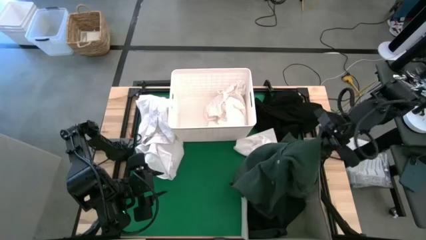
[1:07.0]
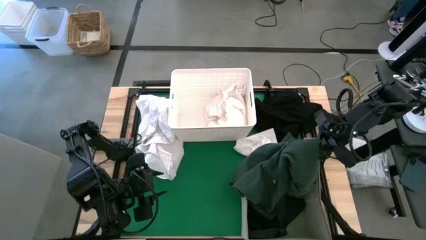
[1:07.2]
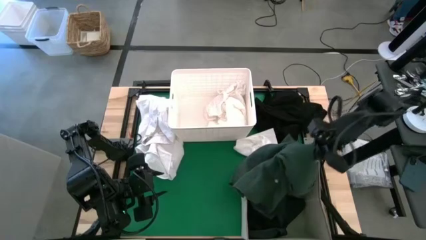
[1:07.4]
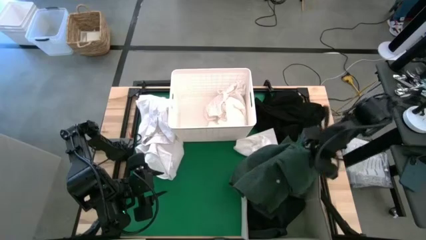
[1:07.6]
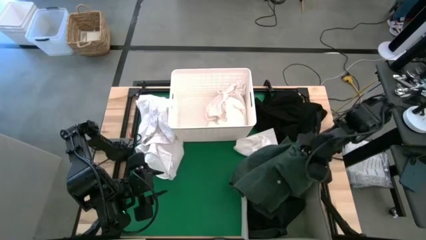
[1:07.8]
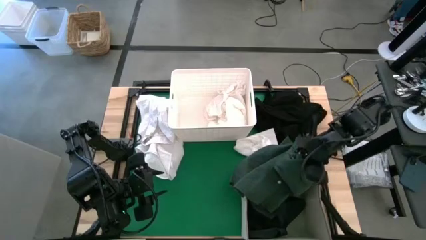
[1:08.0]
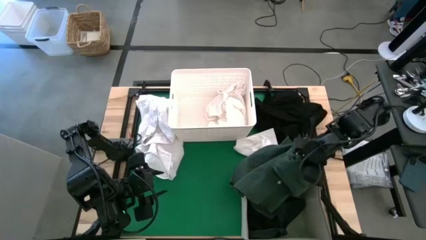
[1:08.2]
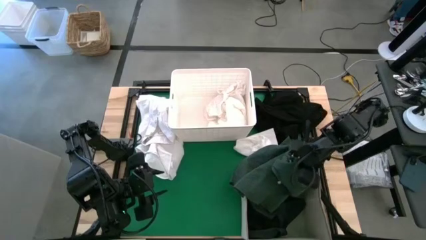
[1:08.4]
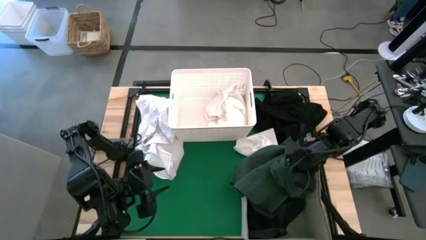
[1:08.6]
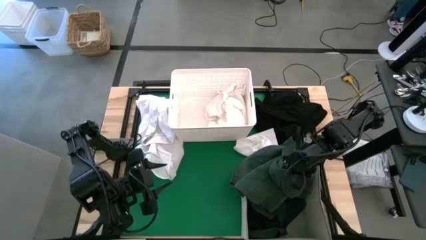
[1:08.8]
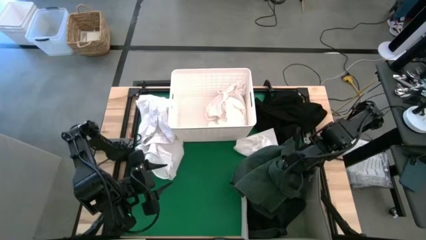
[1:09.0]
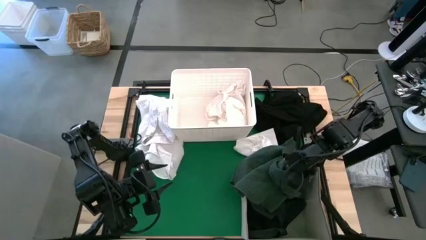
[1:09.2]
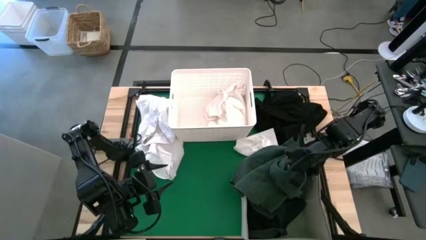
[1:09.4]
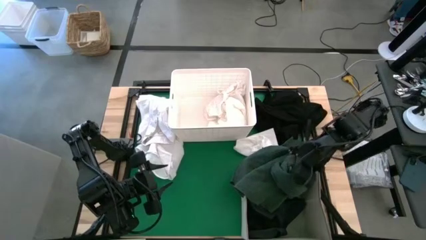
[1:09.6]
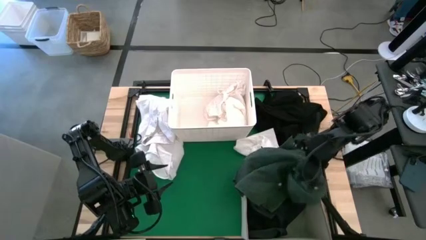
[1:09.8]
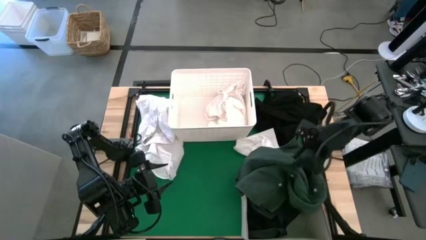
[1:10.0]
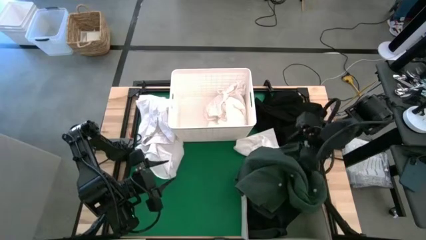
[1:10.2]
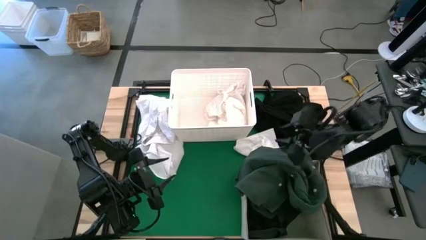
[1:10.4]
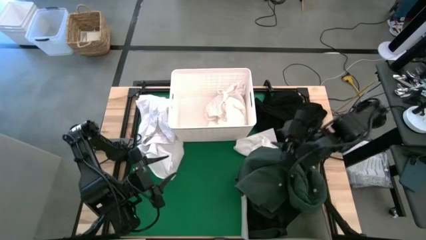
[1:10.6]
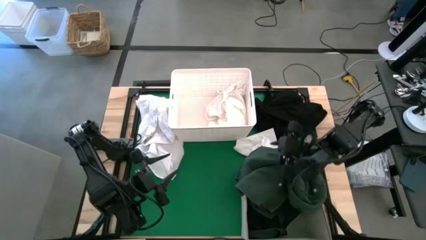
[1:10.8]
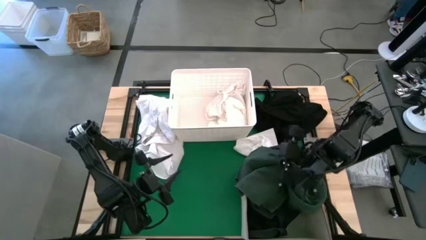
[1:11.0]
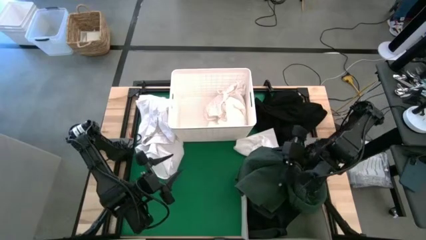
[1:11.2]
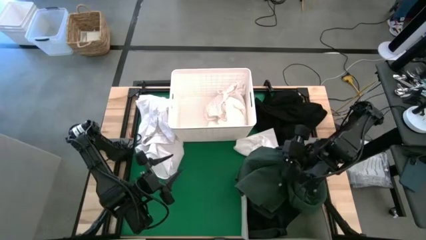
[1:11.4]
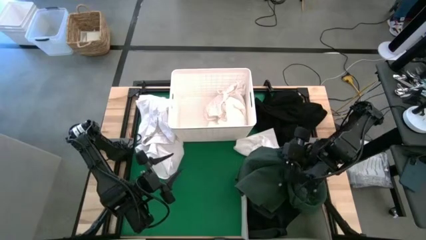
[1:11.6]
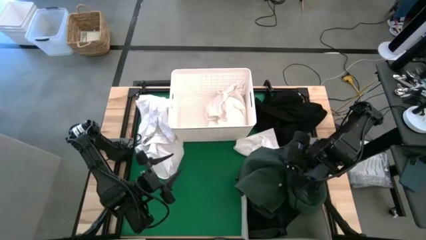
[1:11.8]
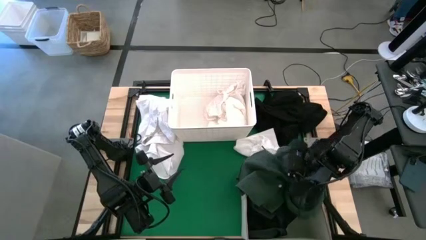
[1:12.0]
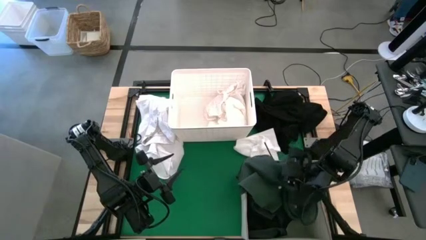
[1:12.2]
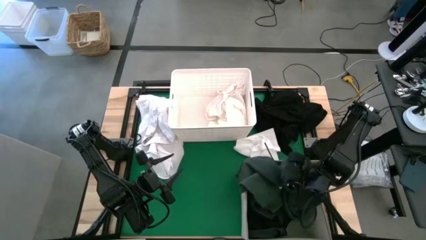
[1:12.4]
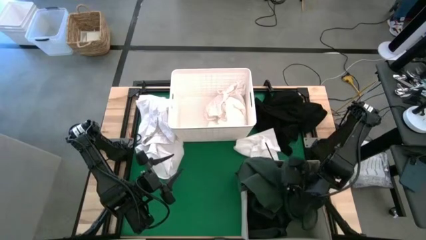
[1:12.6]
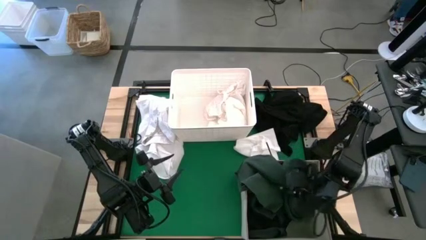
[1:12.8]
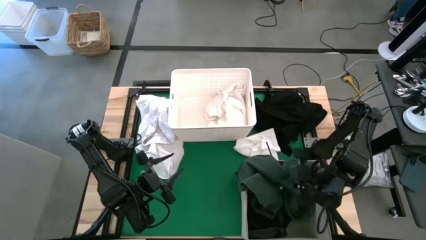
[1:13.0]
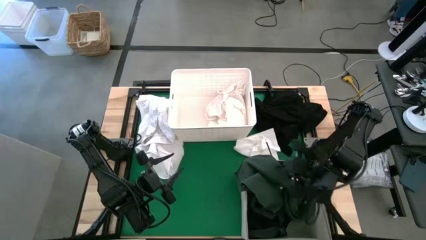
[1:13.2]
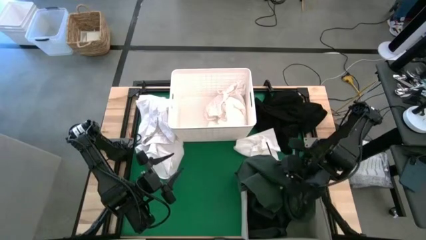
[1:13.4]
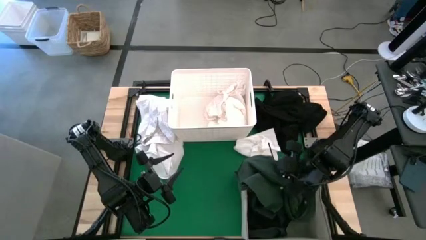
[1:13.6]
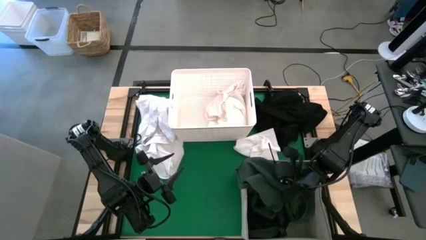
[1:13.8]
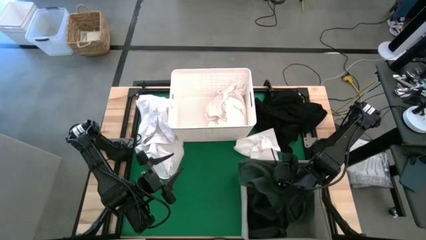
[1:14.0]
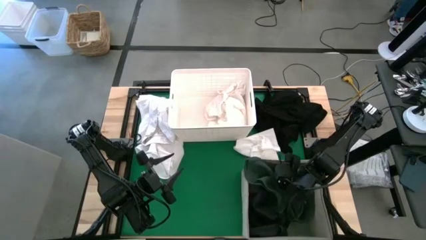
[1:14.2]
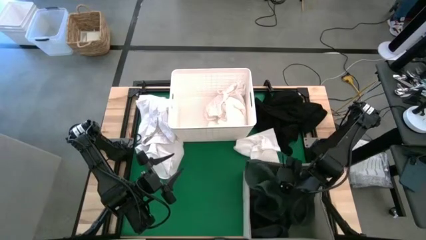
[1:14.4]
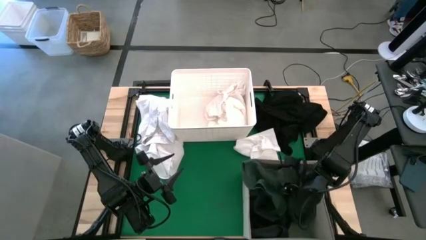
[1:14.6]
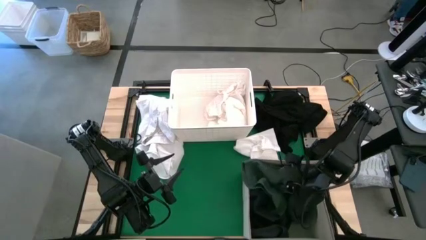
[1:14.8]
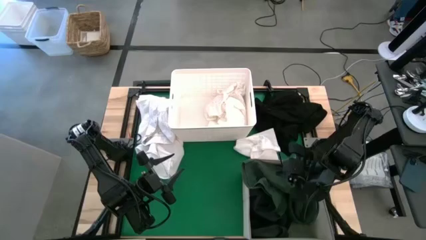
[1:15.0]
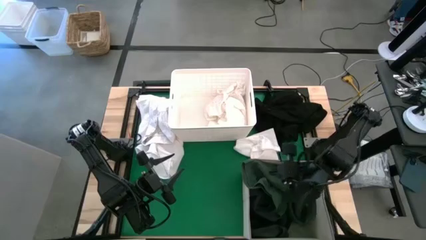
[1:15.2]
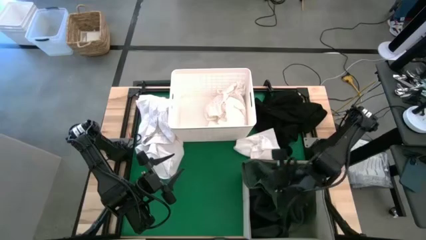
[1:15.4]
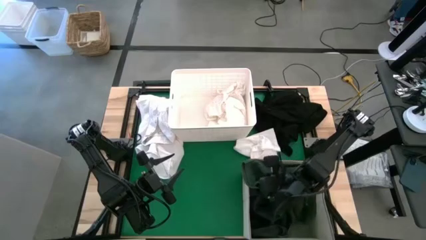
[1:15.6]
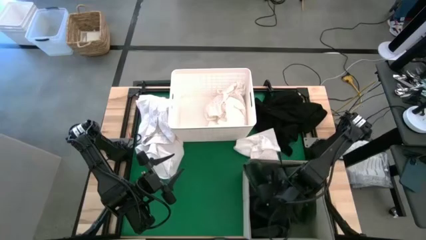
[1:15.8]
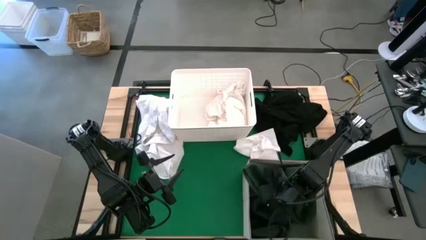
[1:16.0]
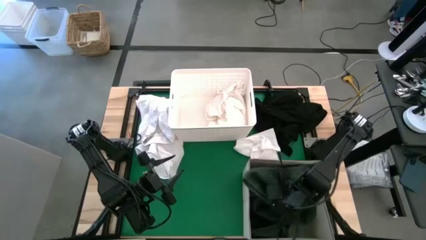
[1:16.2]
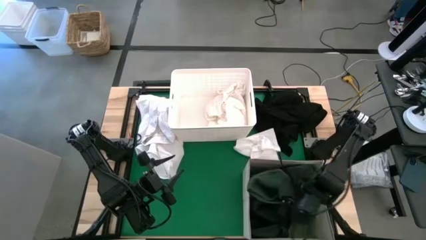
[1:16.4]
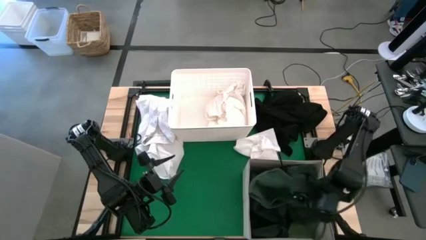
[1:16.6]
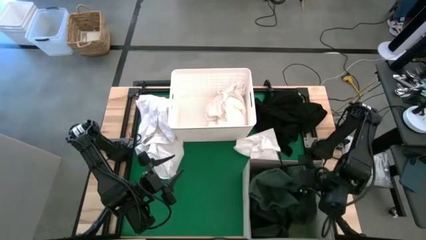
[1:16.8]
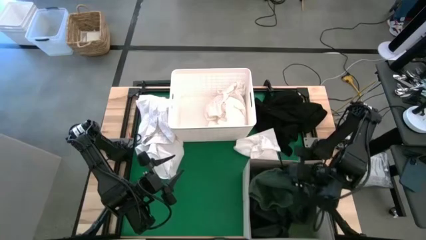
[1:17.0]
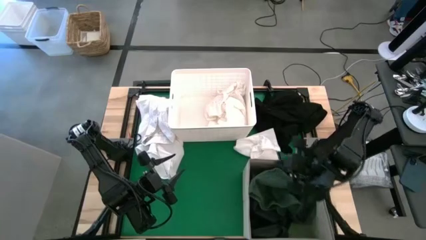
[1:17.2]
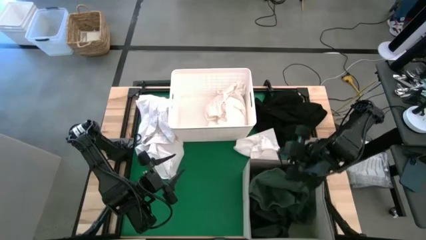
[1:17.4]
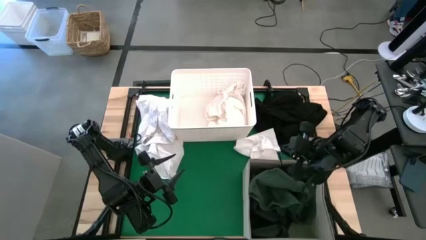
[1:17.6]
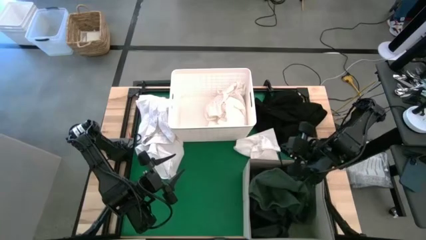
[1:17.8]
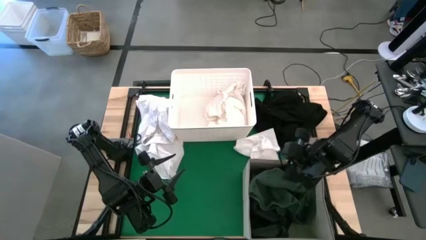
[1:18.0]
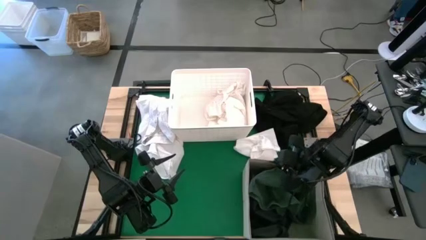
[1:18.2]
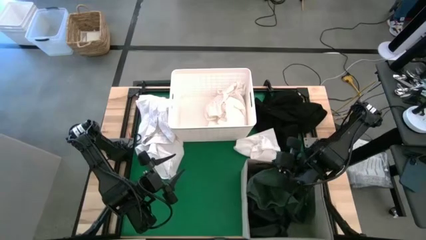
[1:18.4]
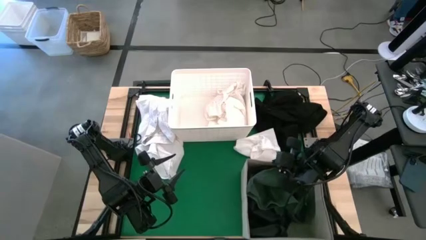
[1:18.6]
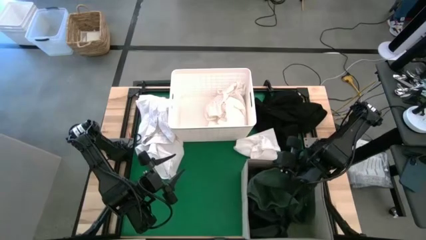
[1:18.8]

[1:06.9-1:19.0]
Put the green cloth into the white fabric storage bin
